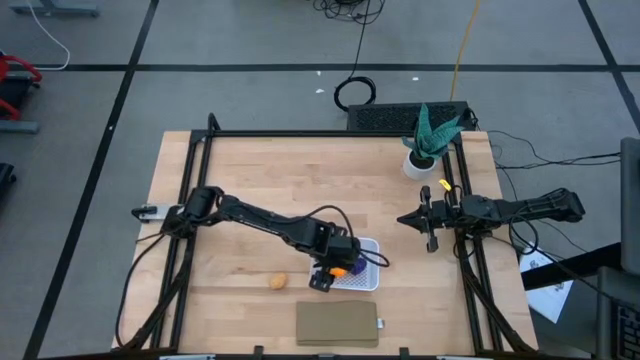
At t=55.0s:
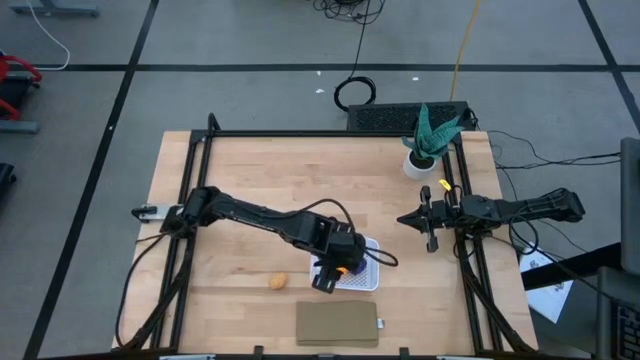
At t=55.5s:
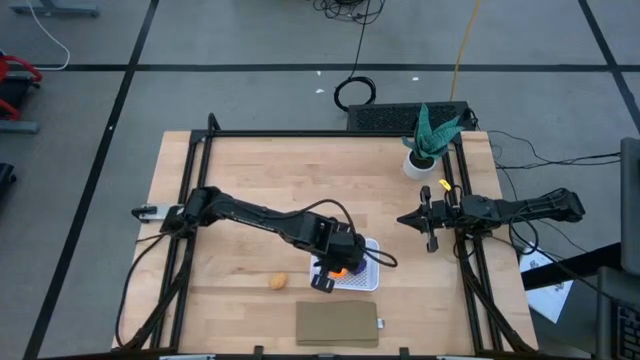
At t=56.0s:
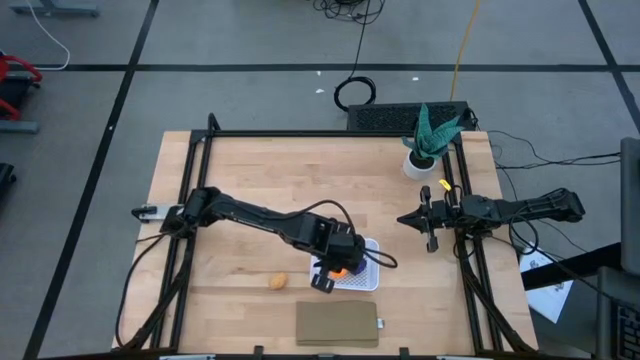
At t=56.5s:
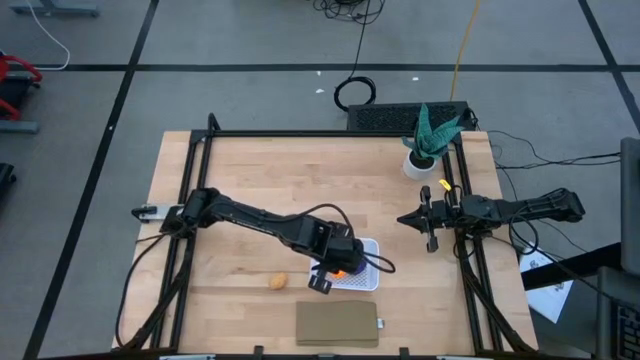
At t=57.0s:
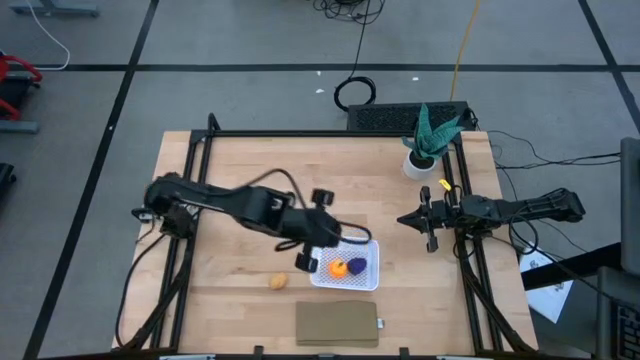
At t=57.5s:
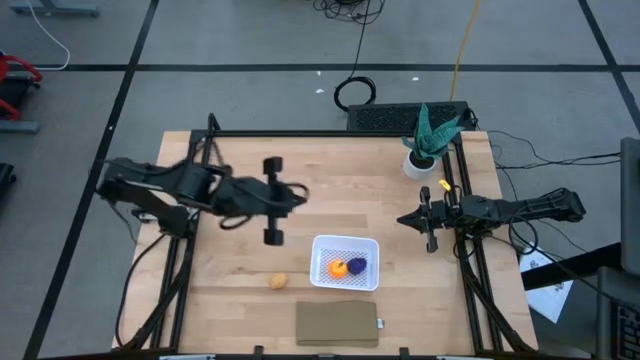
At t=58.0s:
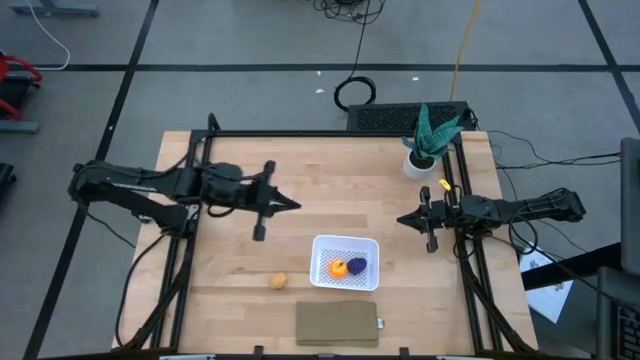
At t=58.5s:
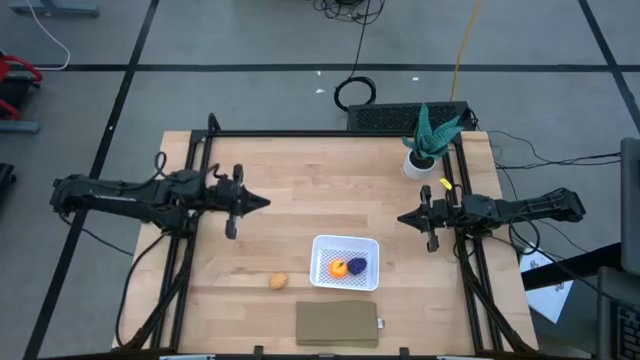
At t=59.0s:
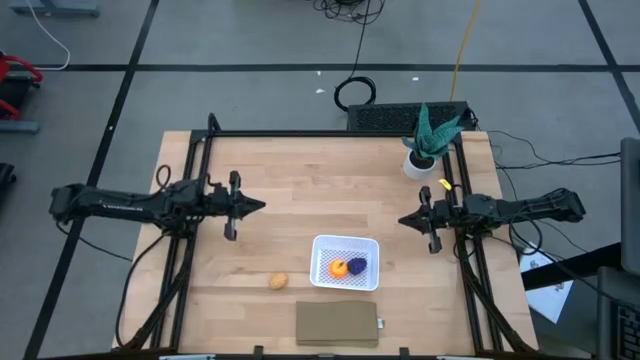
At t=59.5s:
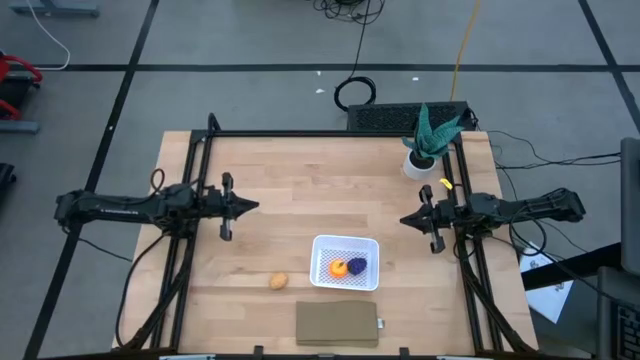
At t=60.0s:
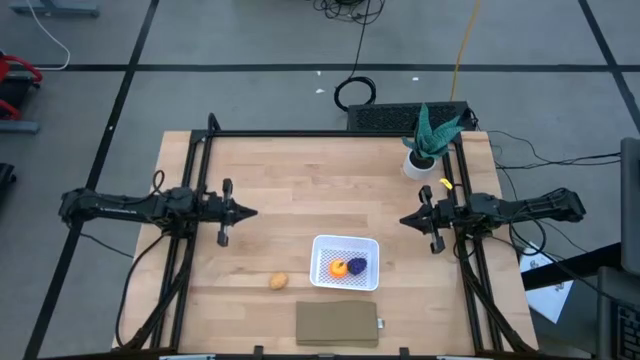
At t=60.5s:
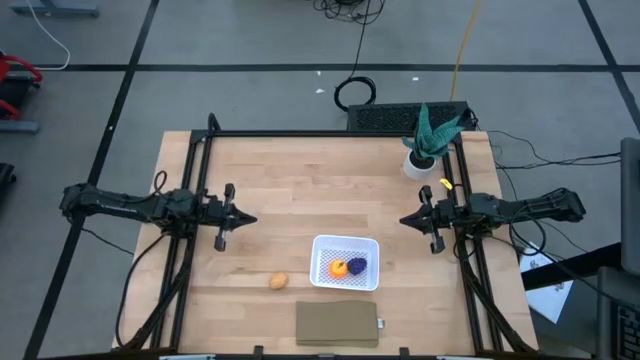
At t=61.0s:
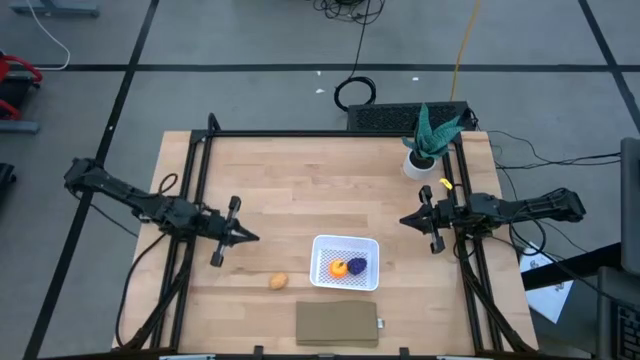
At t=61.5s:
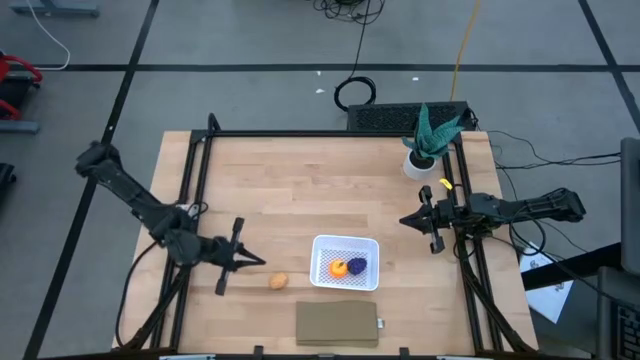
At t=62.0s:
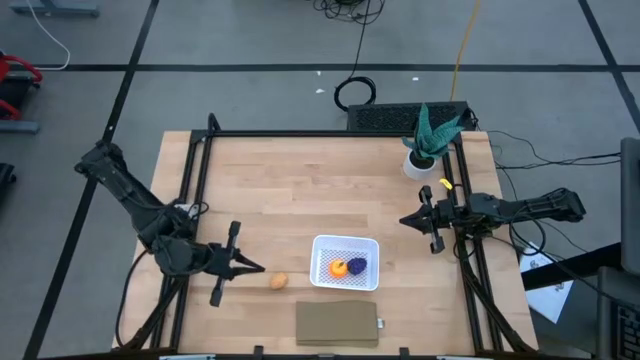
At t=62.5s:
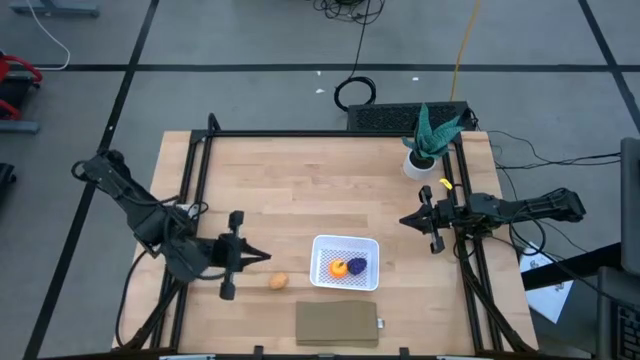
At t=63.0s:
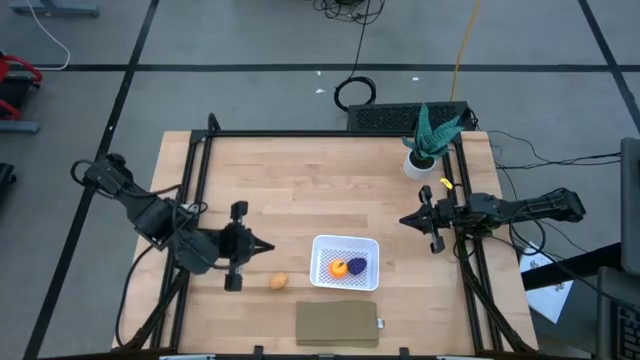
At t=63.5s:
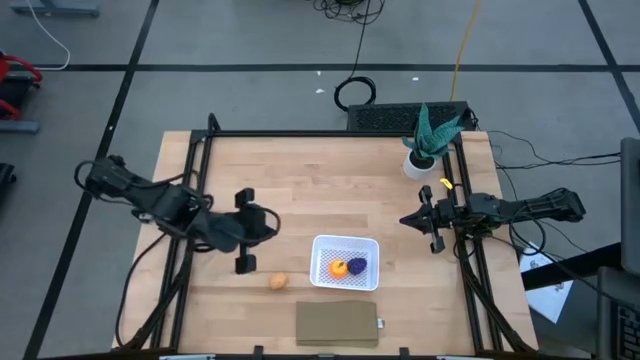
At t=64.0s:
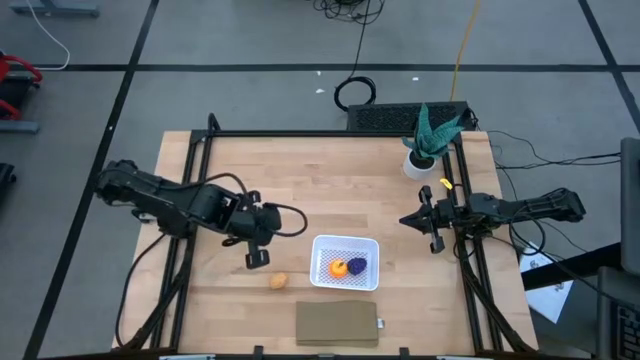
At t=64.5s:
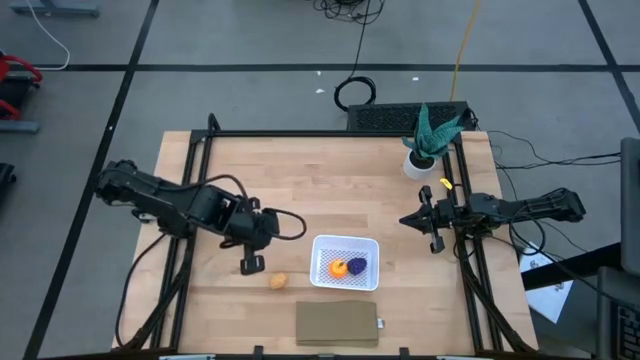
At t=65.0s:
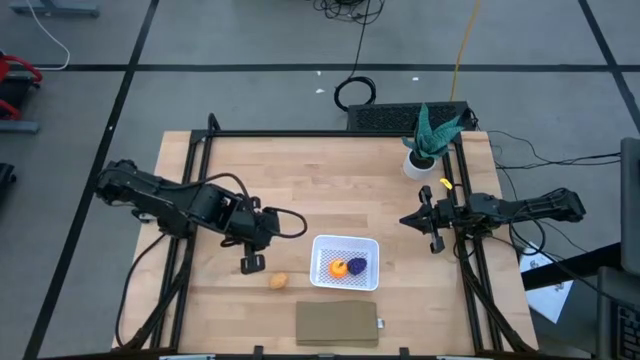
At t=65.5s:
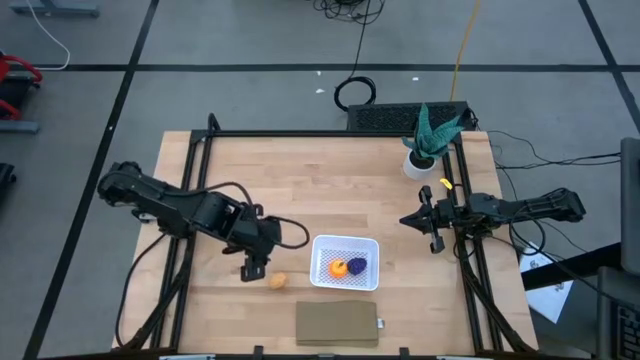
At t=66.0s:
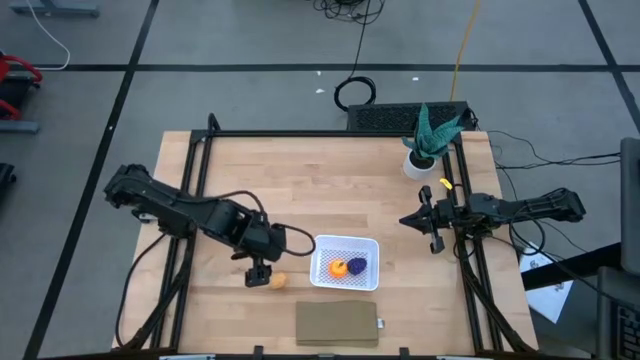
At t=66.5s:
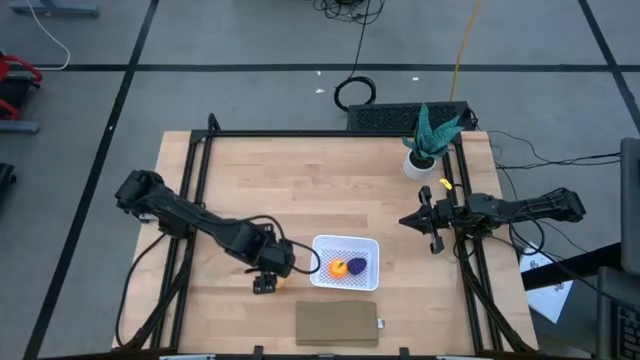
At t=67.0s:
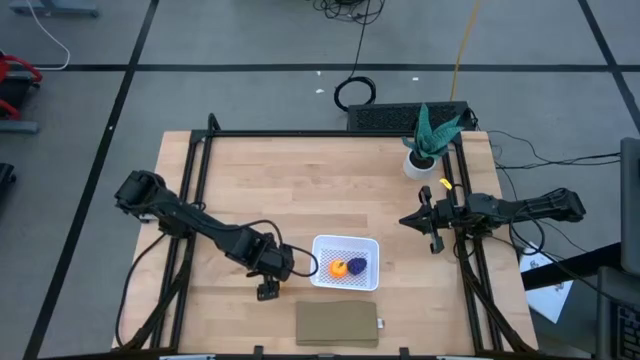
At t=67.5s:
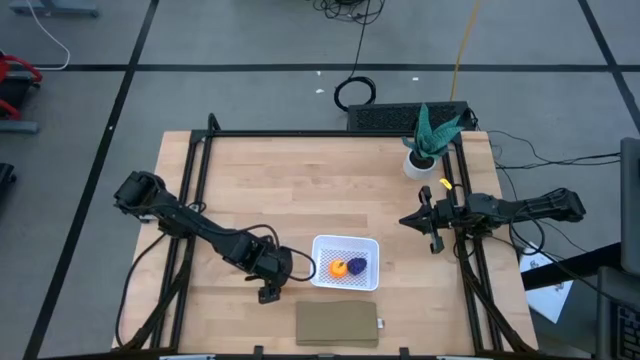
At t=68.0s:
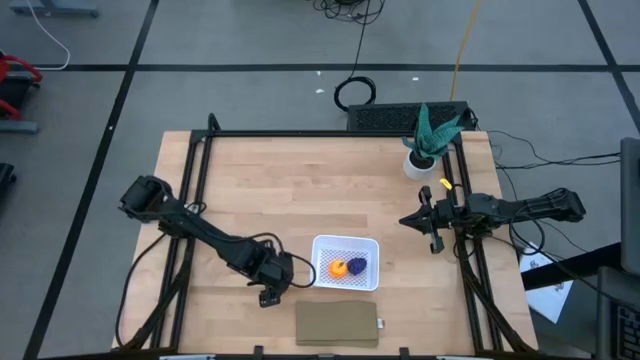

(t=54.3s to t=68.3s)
Task: Pick and placing Produce into tupperware
Put the yellow potato into the white basket

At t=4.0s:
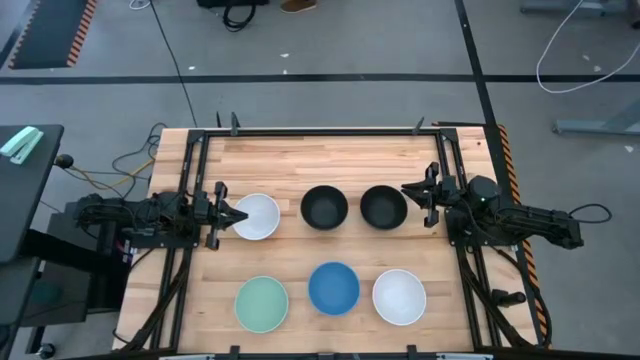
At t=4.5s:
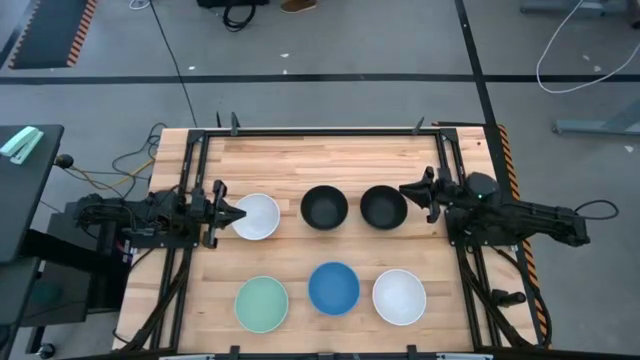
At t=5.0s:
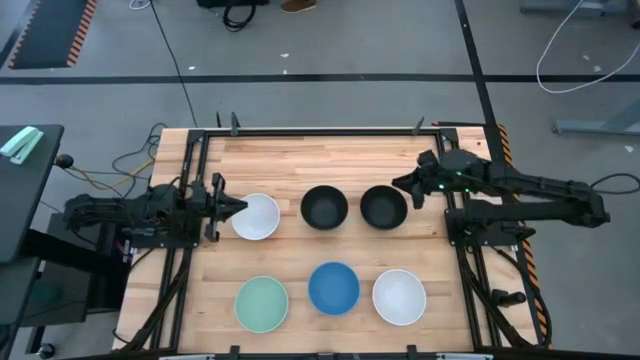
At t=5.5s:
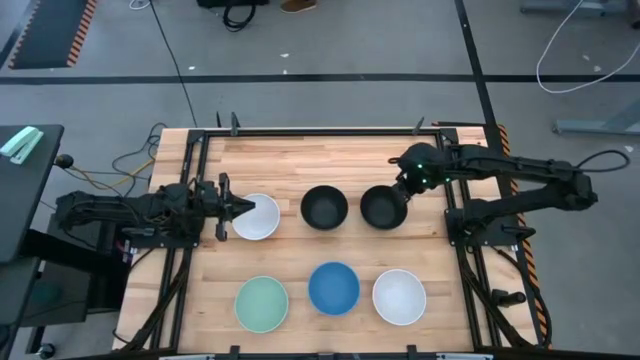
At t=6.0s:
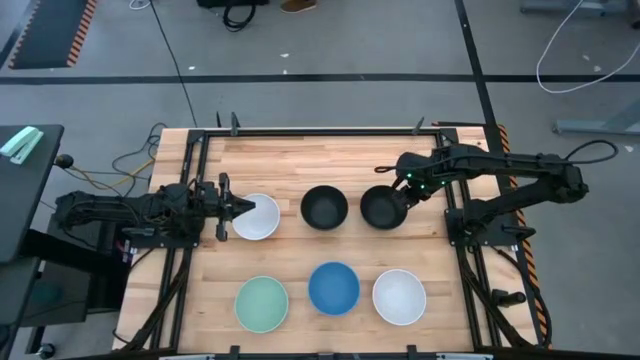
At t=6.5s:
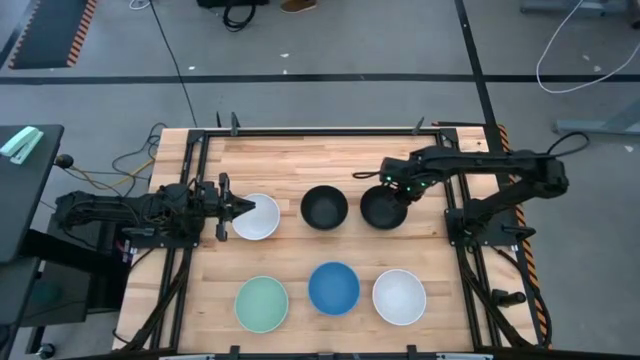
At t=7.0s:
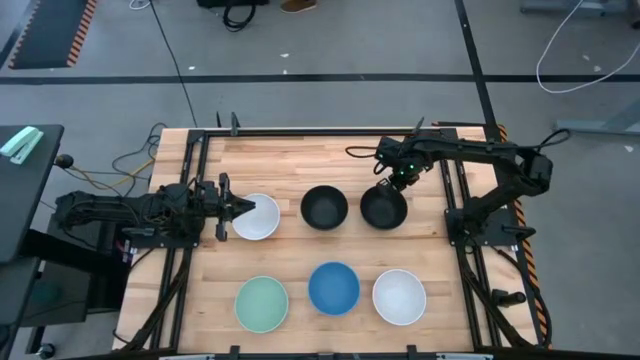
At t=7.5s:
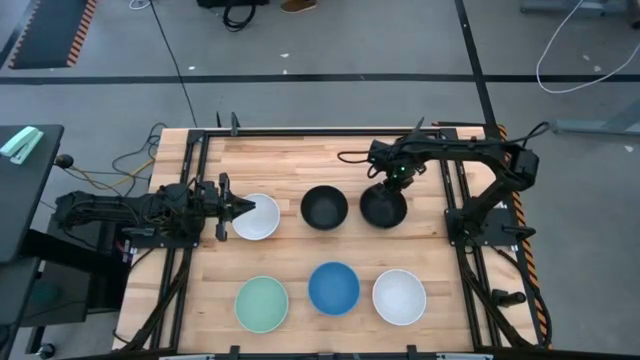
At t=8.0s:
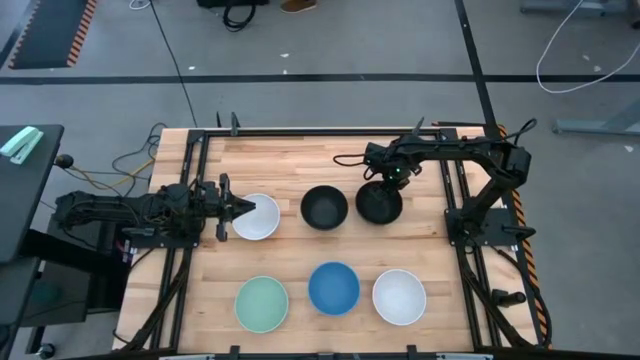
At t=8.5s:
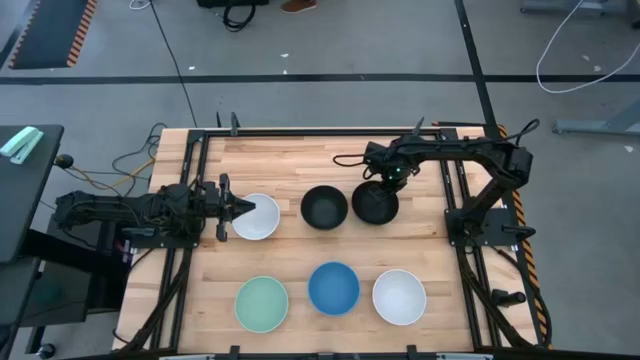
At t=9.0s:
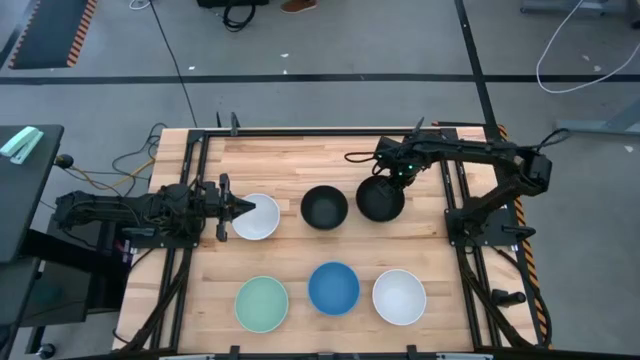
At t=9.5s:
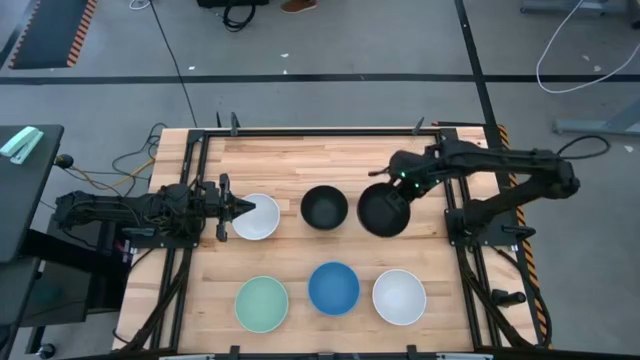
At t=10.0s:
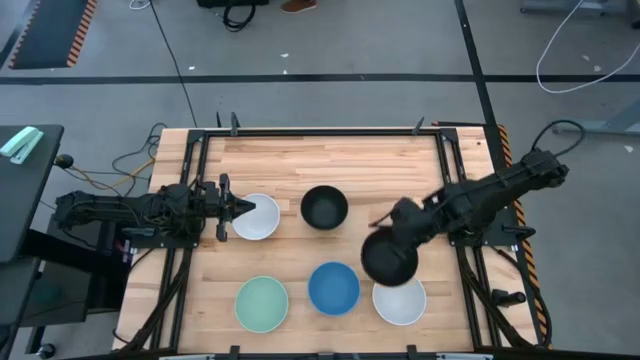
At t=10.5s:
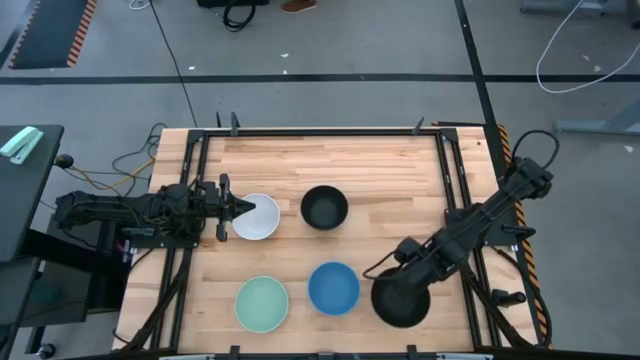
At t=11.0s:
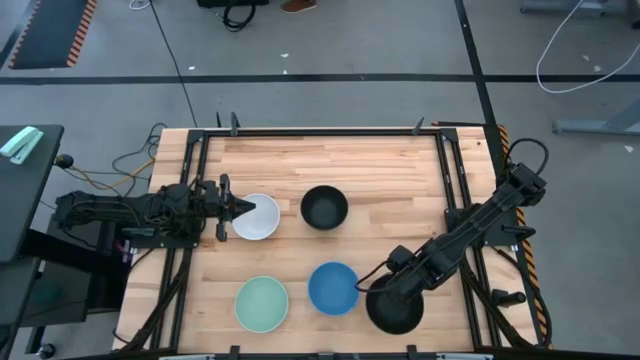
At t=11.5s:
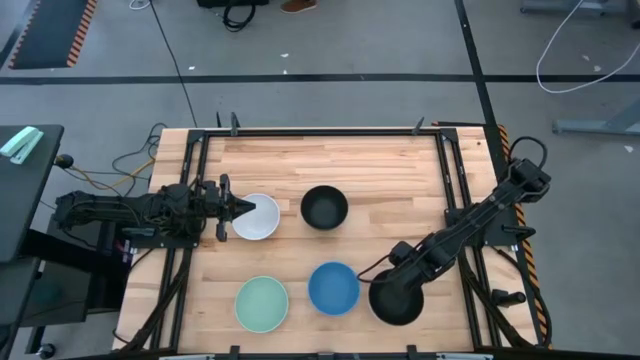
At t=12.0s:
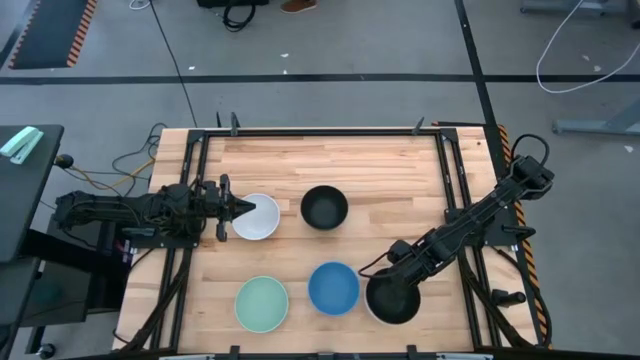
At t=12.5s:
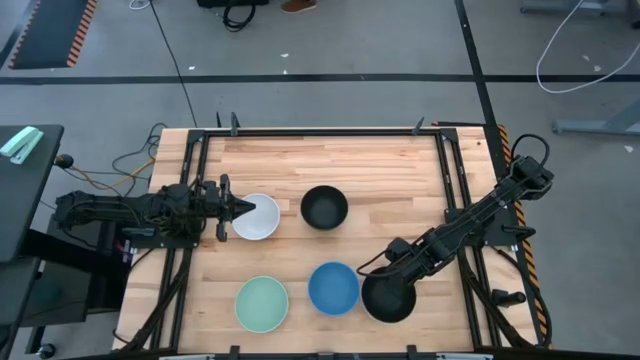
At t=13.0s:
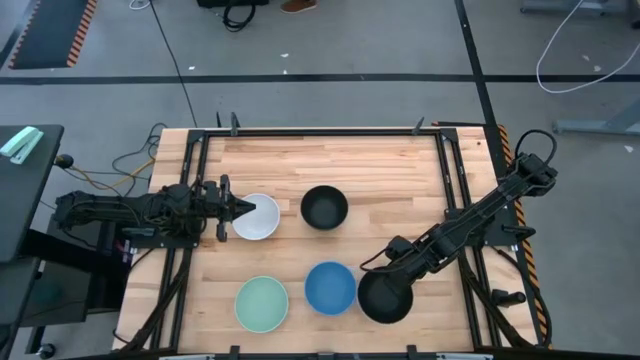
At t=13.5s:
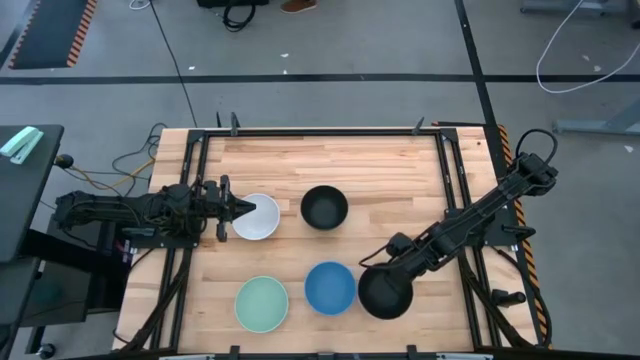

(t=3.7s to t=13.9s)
Task: Nest bowls inside each other
Stack the right black bowl on the right white bowl
